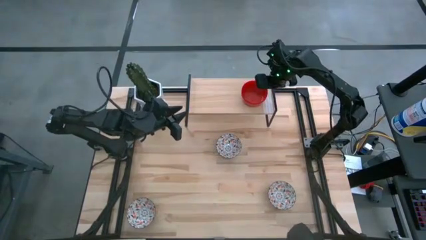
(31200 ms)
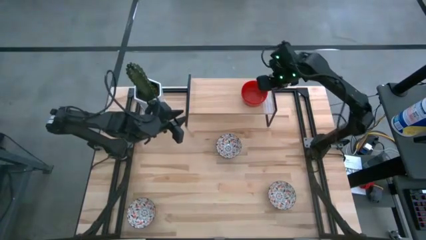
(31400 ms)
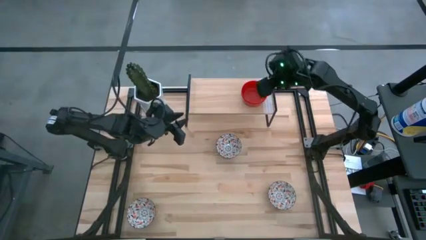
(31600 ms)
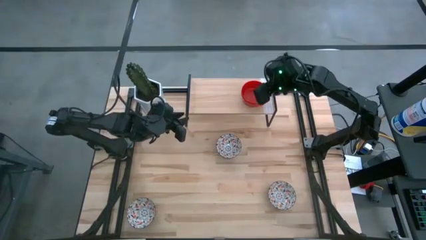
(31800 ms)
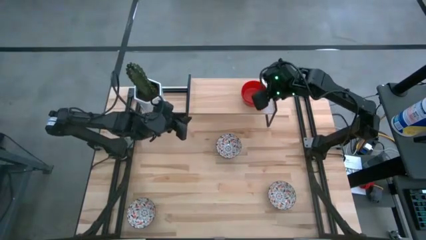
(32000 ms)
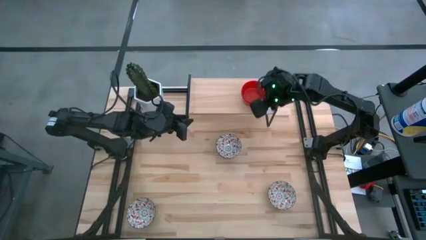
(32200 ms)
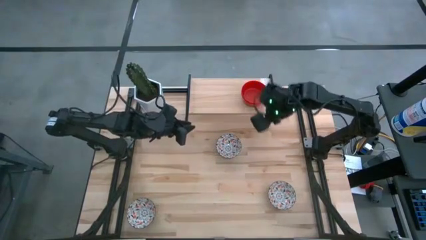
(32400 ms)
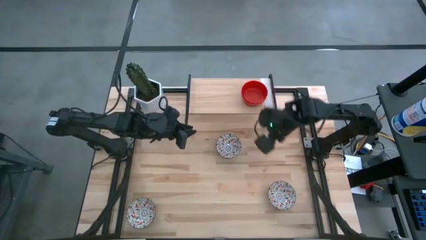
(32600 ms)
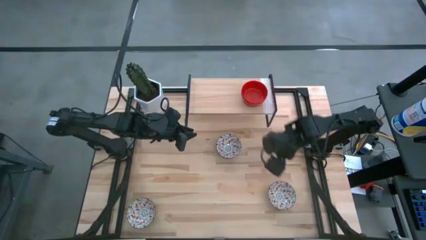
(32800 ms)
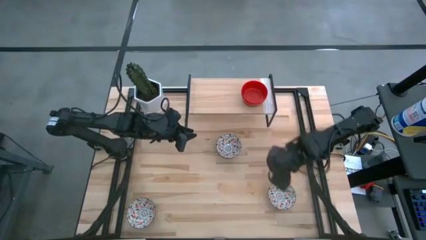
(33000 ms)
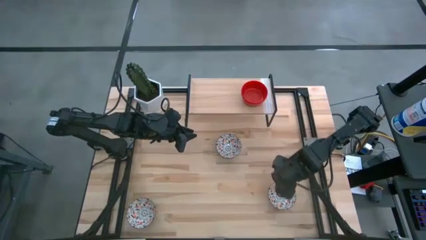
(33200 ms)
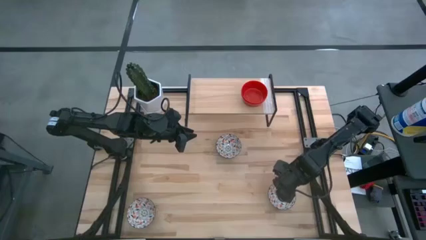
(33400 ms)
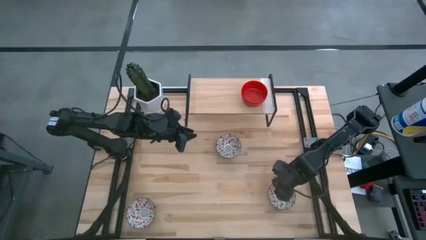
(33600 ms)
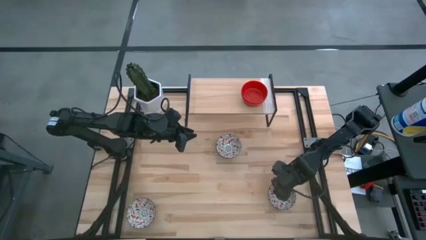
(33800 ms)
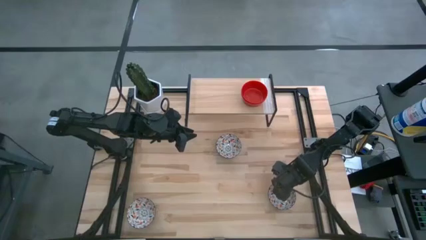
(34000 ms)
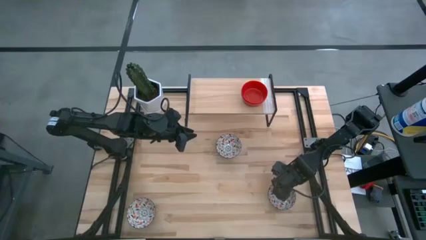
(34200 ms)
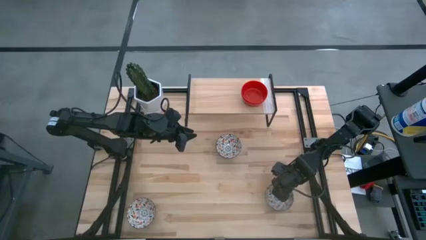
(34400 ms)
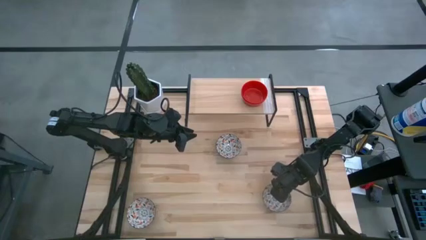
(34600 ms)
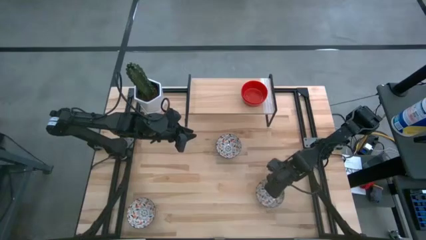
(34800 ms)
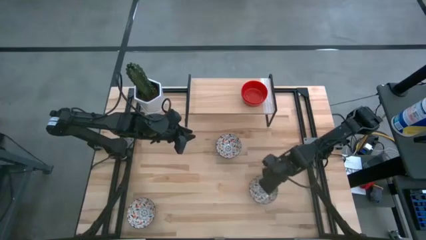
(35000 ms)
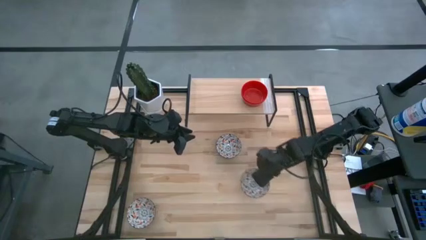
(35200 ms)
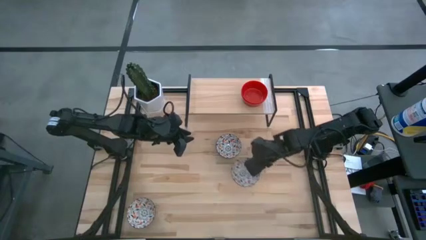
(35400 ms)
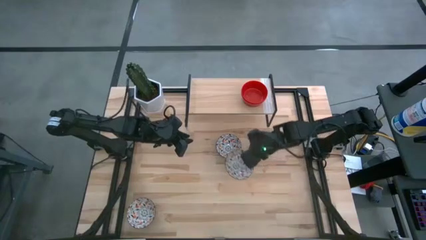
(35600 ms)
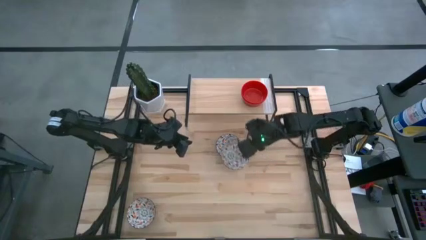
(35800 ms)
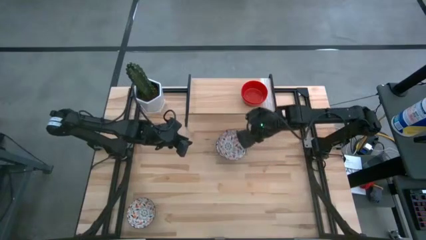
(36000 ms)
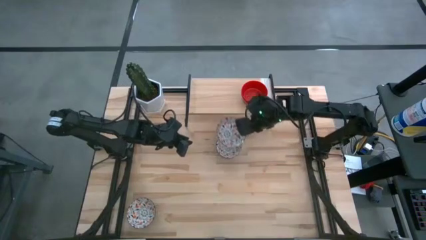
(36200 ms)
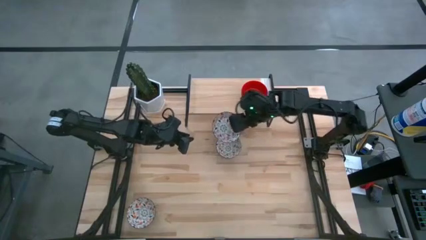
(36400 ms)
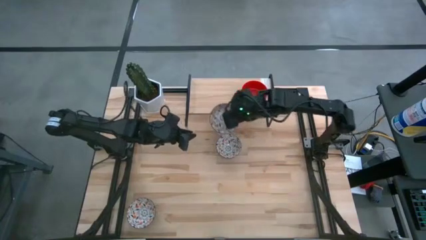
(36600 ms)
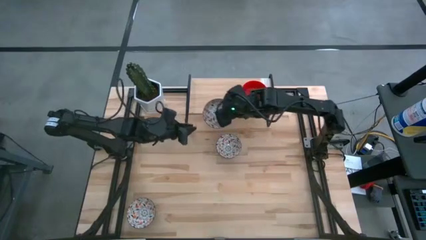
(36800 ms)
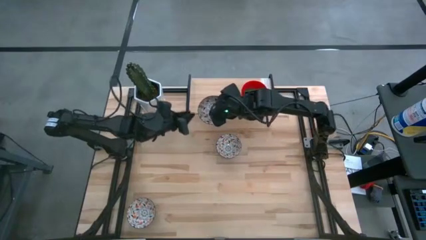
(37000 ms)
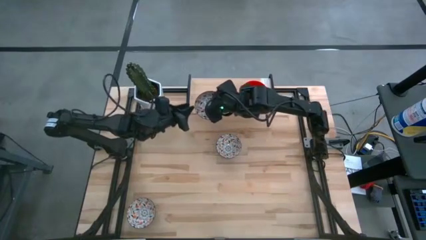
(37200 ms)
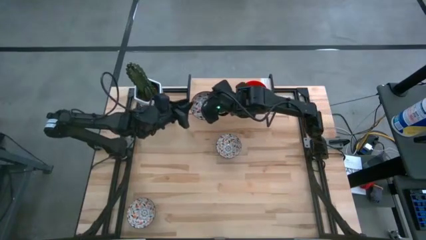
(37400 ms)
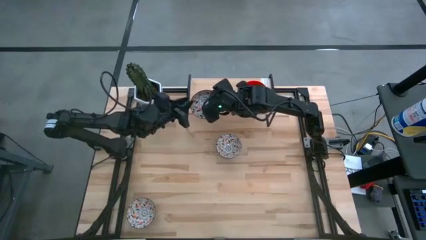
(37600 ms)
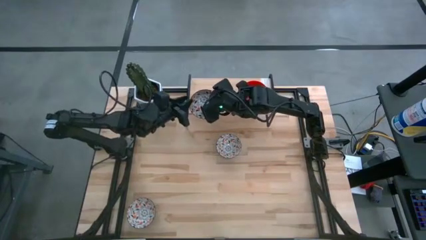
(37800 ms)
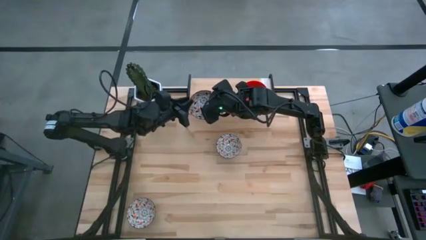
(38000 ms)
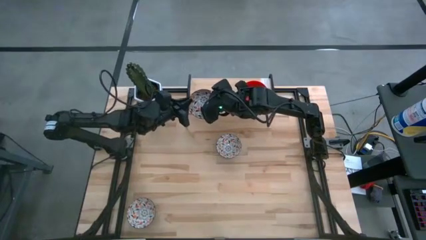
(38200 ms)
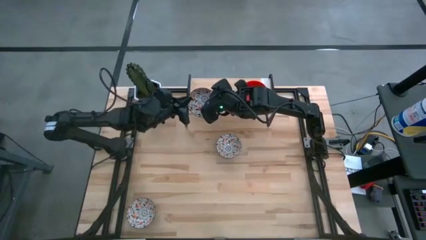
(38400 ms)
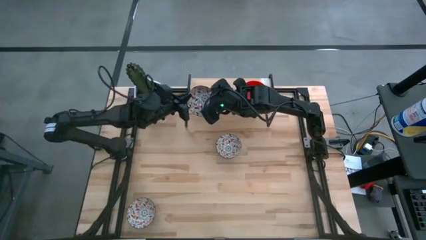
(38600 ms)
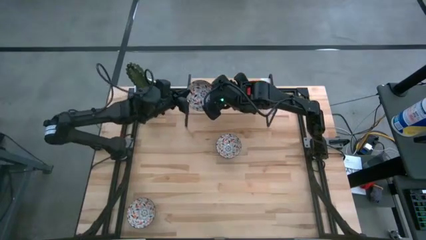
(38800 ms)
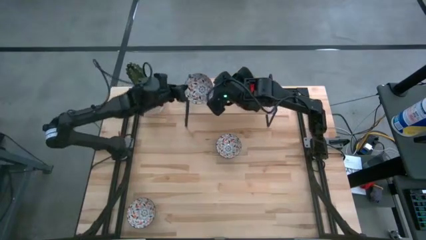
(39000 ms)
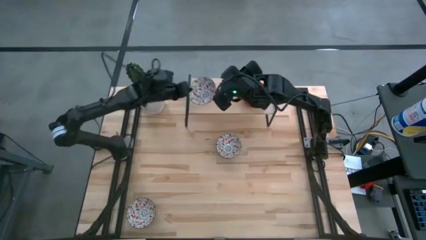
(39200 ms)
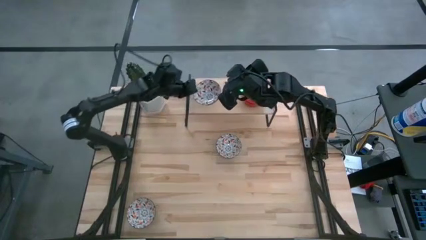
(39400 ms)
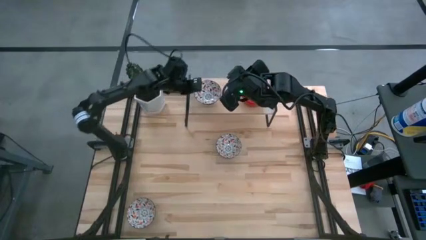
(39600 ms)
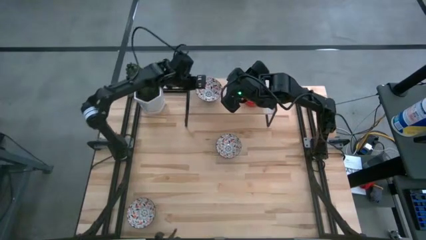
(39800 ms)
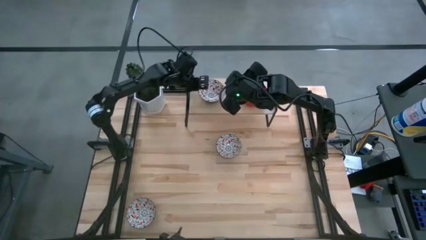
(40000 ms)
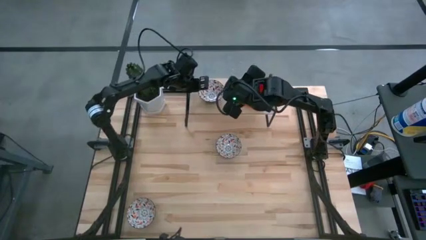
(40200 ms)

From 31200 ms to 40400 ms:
Task: Pick & Place Mini bowls
Put the right white patterned bowl on the shelf

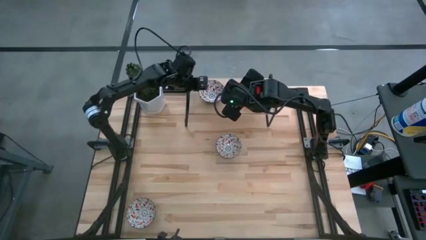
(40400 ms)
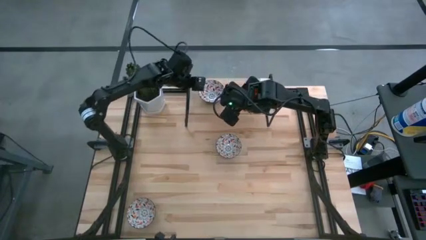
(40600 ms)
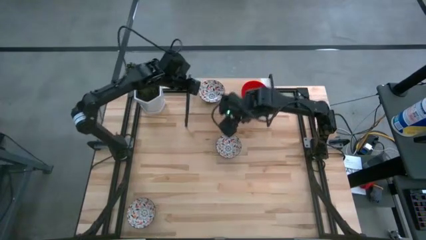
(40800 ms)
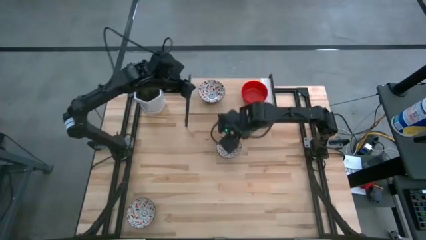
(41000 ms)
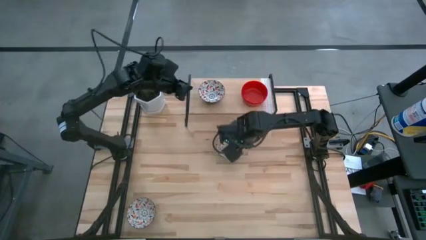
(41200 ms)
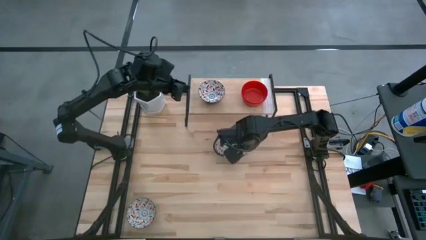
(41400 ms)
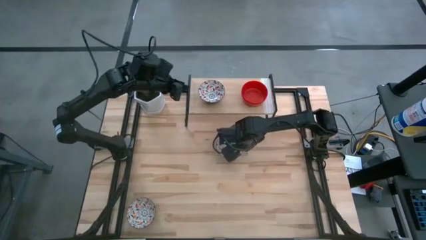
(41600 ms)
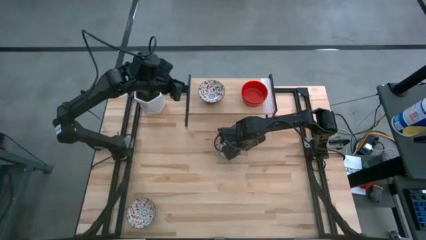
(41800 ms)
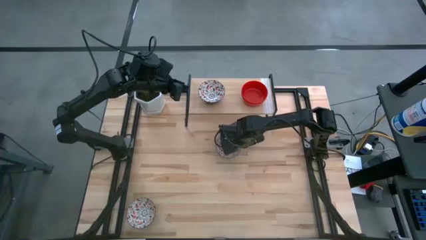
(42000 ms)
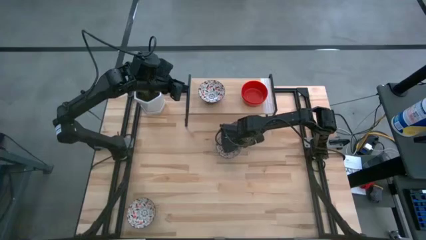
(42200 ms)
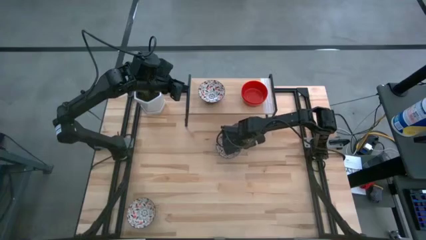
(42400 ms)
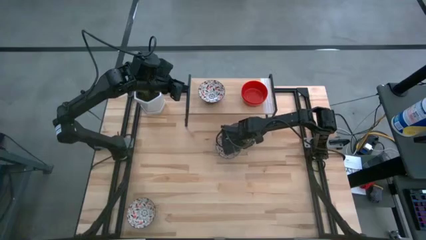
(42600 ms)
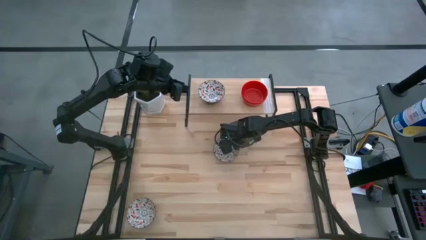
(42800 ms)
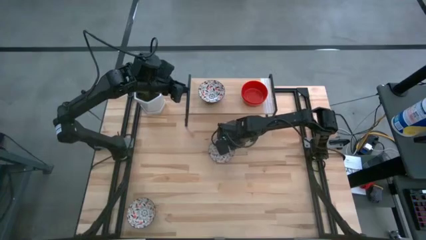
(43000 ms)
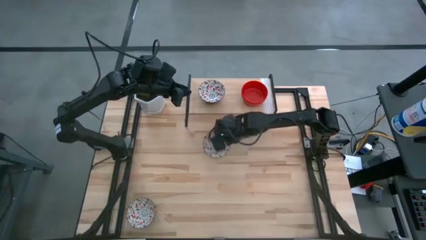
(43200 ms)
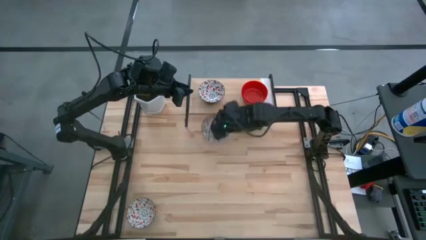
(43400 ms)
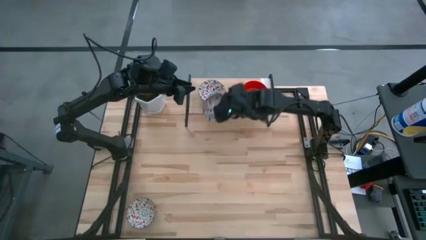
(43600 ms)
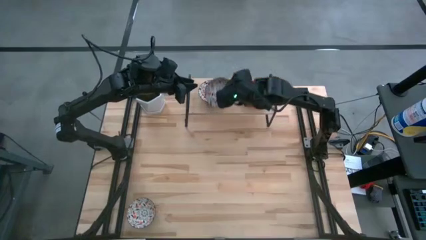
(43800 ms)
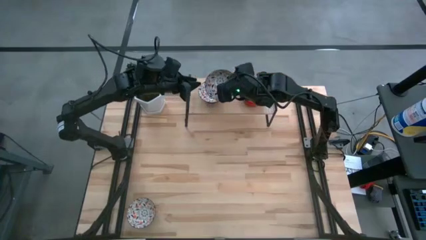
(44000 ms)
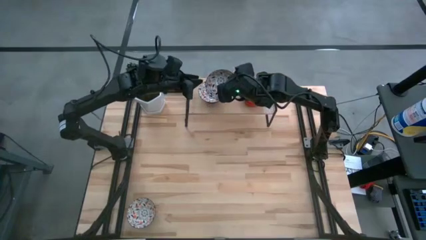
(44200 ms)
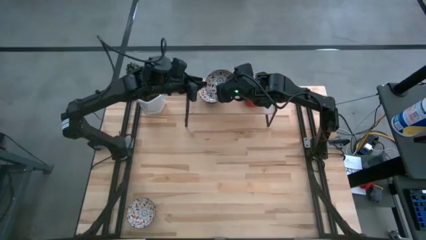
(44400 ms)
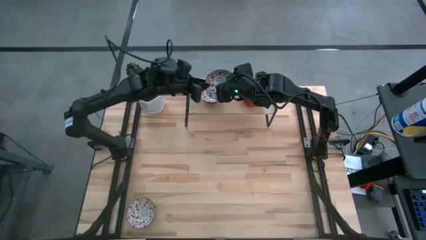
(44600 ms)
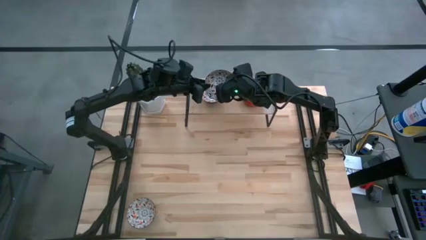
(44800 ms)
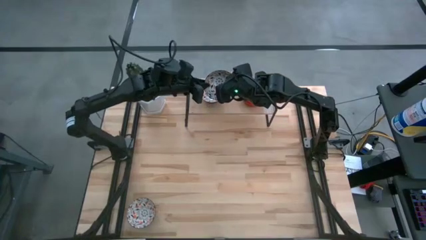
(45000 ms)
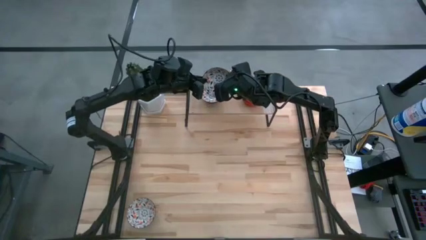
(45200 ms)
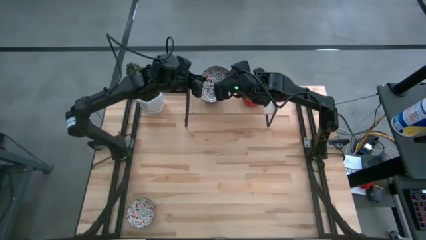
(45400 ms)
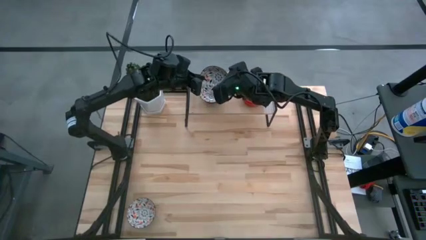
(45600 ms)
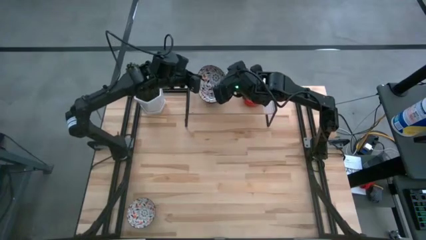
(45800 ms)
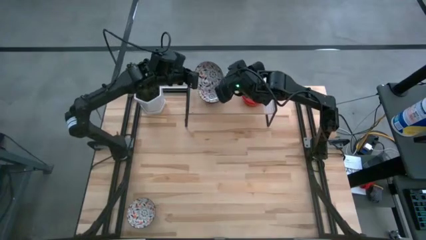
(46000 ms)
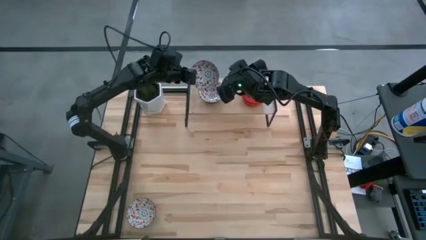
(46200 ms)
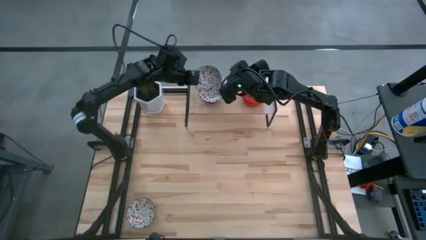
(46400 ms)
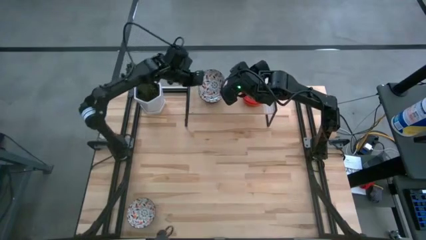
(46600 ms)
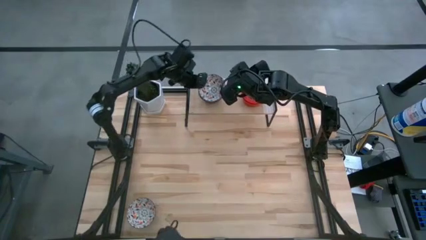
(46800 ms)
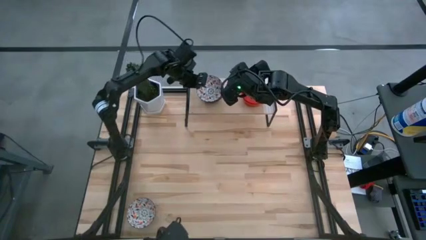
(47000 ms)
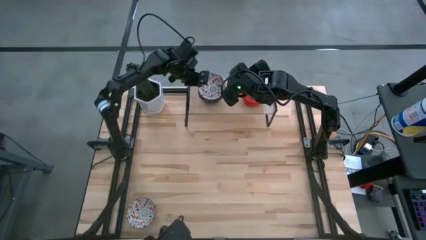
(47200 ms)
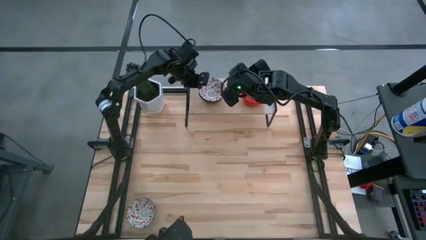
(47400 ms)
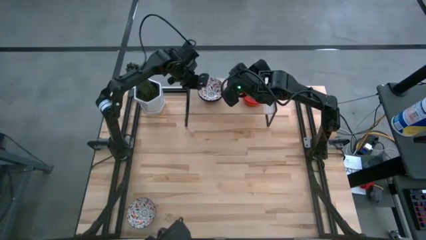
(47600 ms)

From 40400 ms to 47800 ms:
Stack the top white patterned bowl on the white patterned bowl on the shelf
